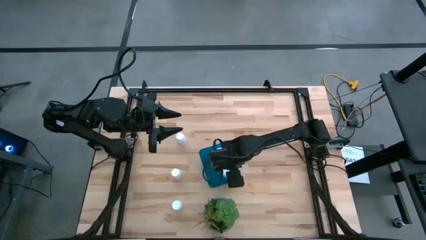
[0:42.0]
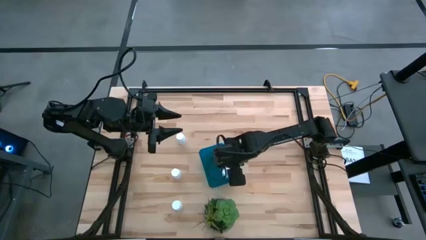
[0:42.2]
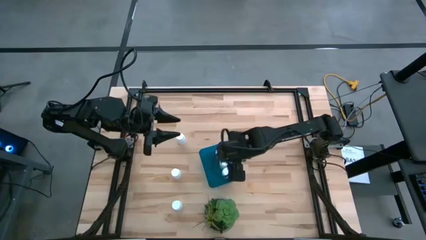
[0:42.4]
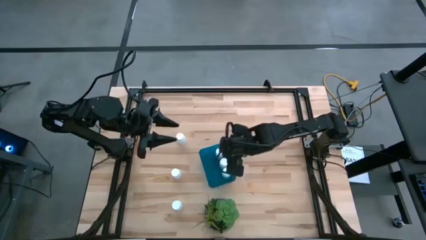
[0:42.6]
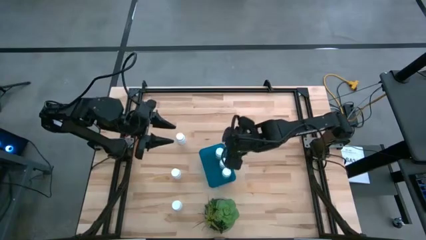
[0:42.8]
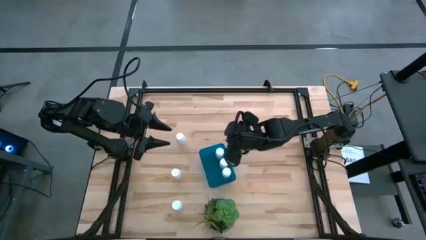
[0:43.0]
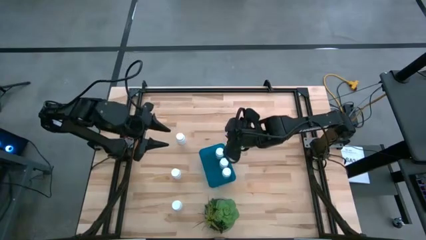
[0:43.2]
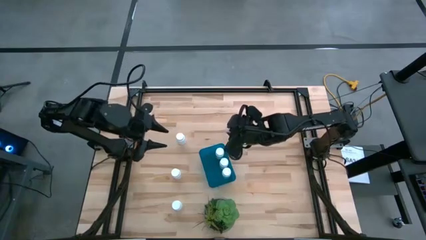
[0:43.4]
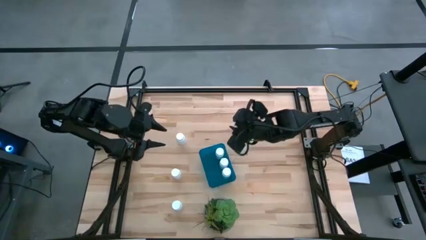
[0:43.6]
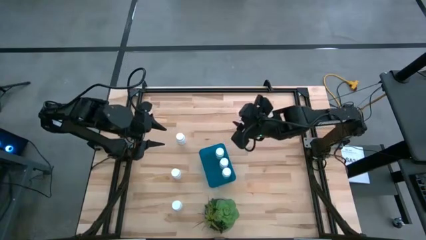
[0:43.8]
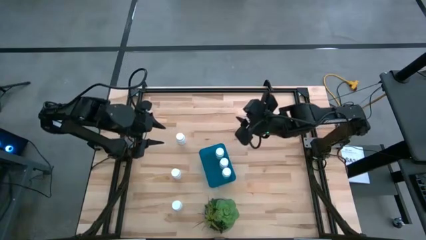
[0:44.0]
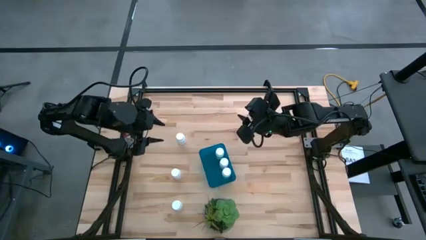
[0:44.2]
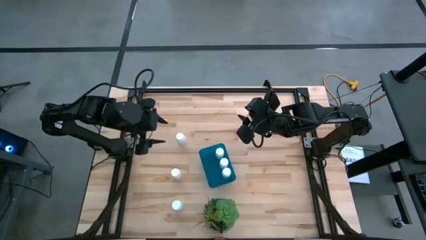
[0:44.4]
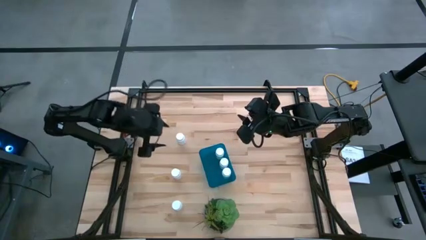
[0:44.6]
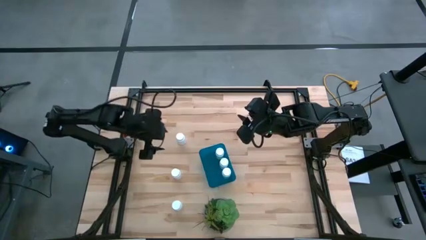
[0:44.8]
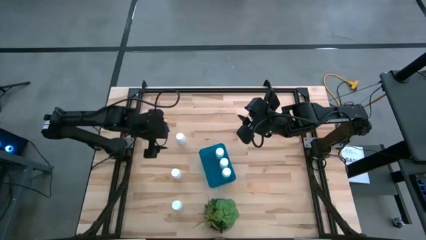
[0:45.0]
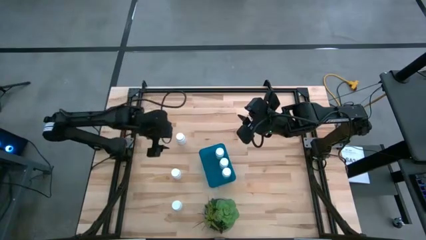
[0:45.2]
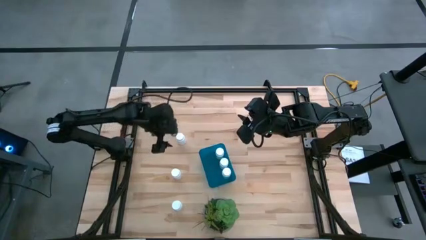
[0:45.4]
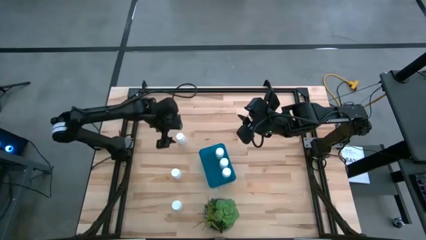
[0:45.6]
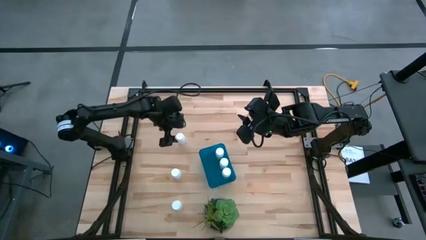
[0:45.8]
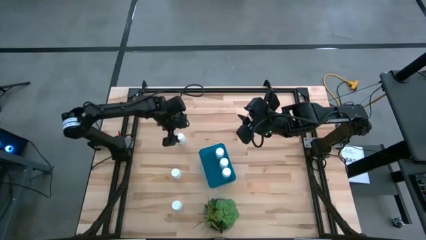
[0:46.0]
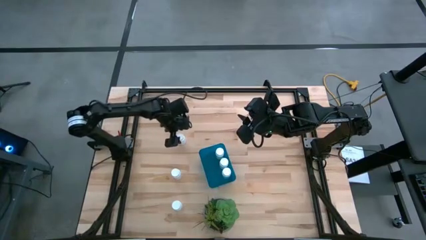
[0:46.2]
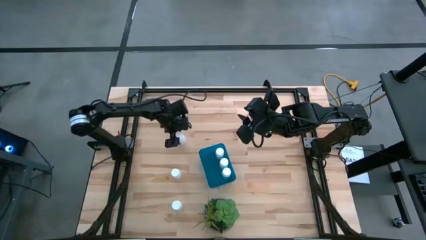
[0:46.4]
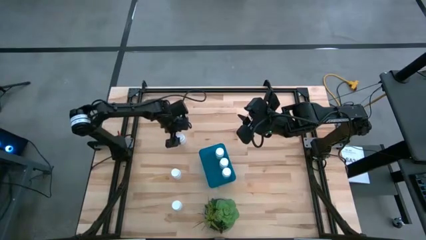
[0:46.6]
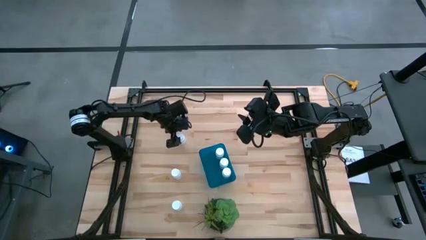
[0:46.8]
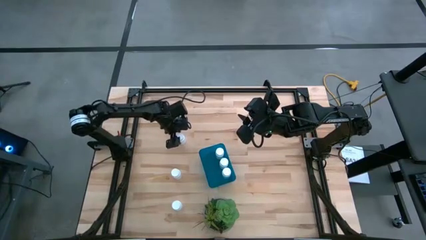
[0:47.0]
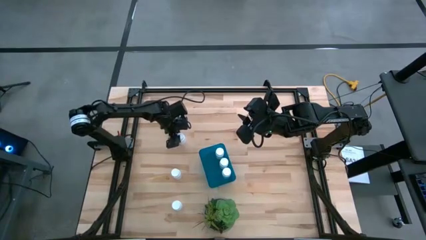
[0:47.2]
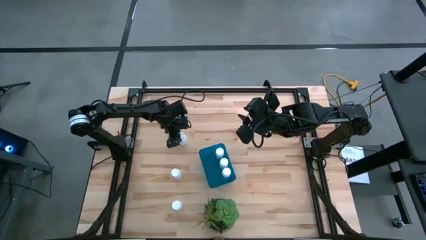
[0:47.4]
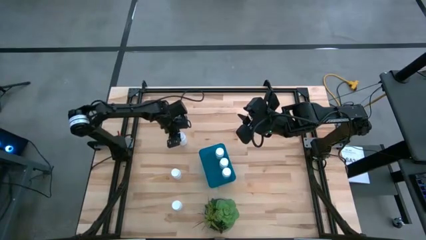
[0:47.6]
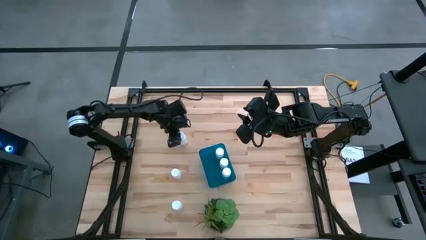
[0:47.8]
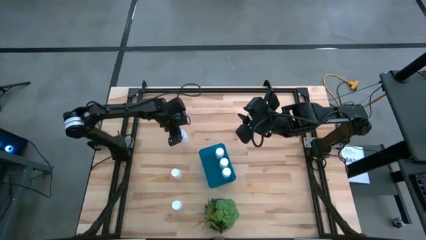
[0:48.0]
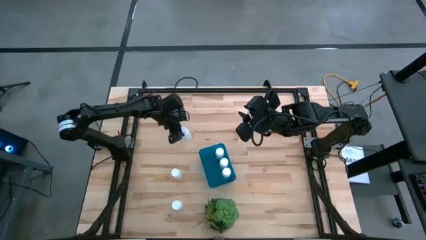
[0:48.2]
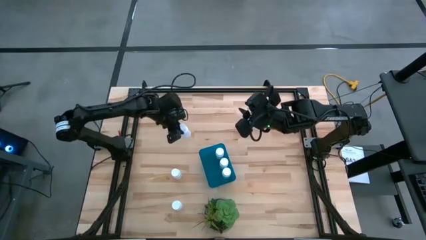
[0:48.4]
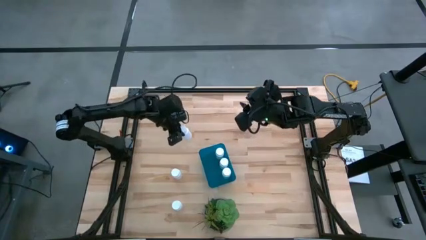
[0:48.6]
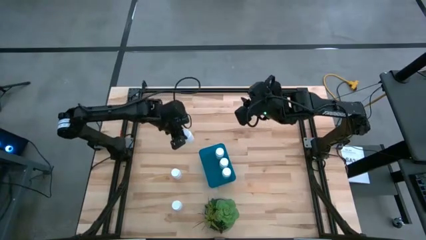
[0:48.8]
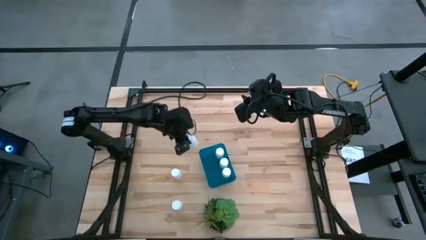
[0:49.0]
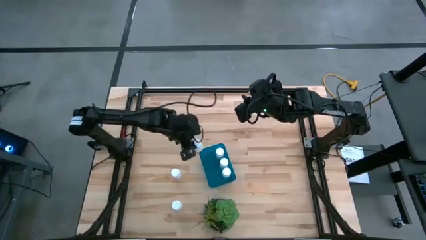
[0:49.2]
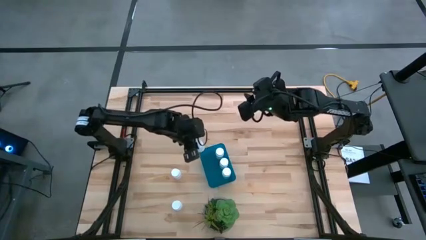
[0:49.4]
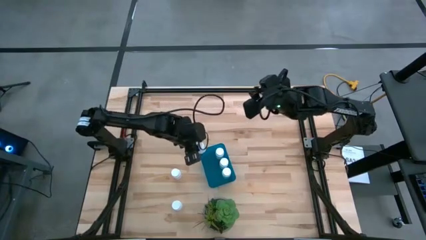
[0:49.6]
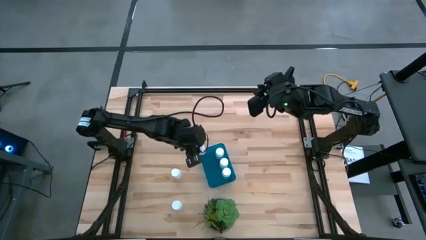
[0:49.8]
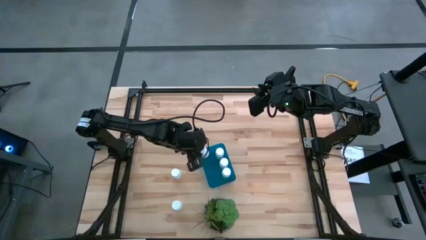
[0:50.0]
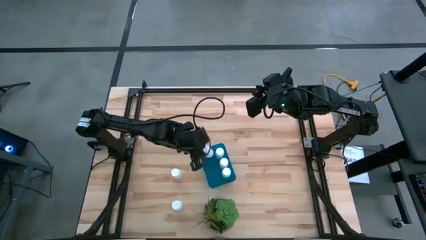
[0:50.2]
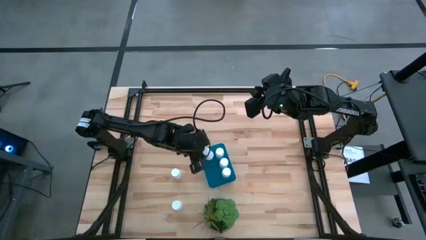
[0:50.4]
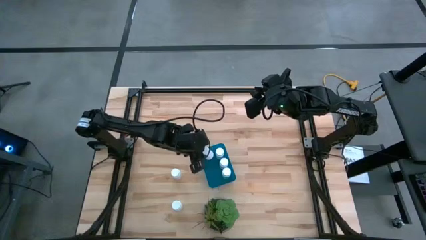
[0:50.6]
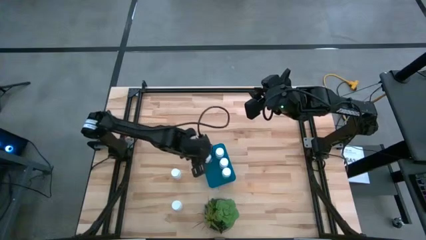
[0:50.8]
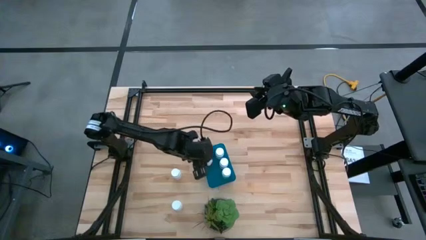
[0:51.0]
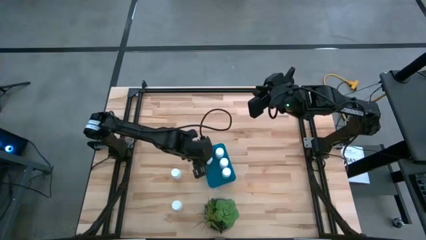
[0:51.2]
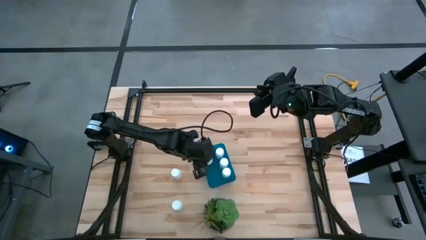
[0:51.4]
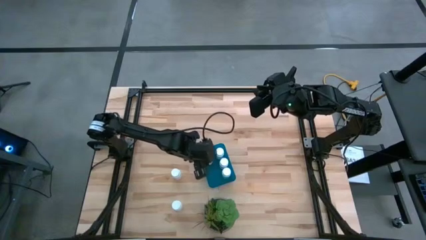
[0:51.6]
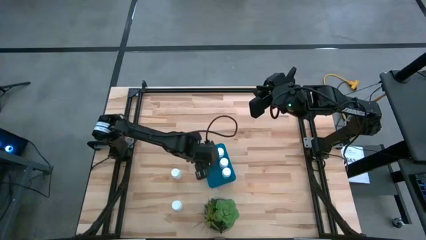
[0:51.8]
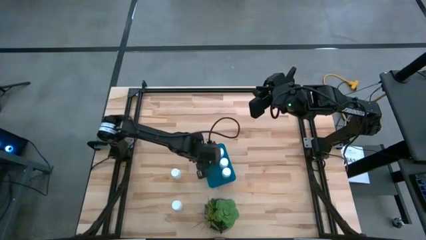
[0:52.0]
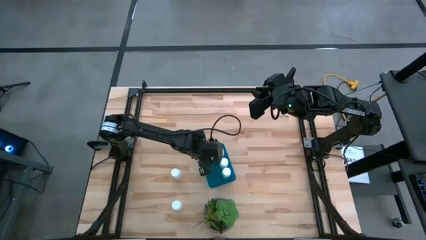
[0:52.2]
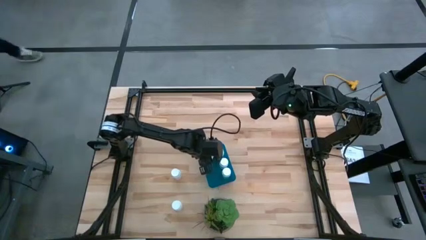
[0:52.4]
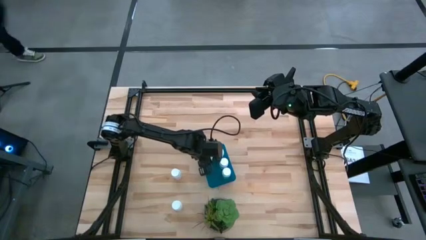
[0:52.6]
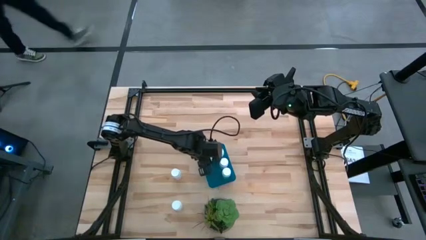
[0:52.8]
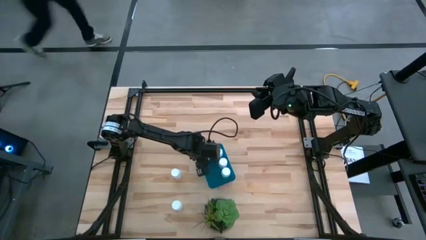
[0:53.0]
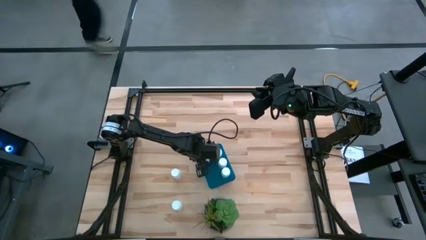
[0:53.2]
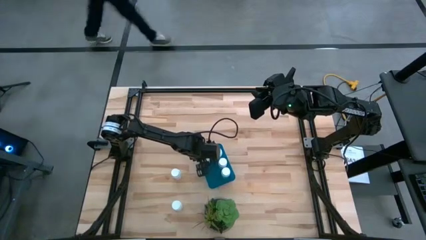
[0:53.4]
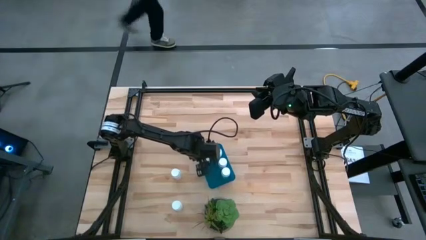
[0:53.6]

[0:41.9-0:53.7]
Task: Pick and place pill bottles into a basket
Put the medicine bottle on the container
